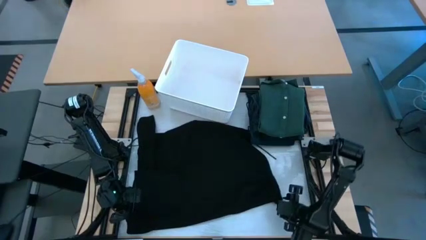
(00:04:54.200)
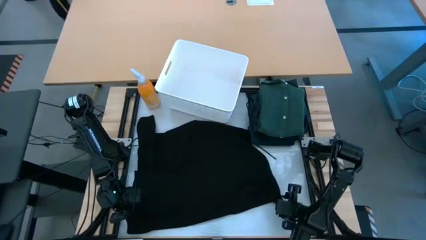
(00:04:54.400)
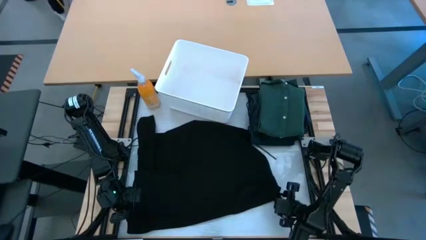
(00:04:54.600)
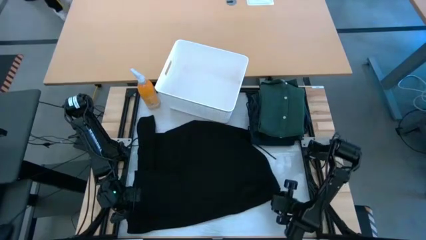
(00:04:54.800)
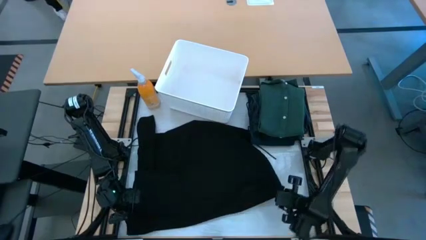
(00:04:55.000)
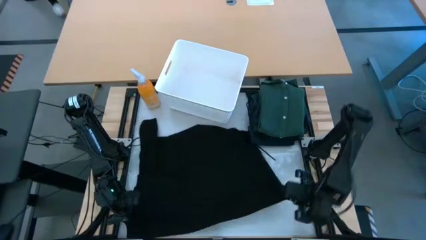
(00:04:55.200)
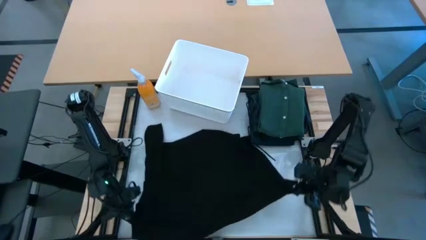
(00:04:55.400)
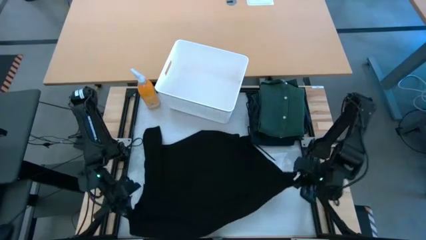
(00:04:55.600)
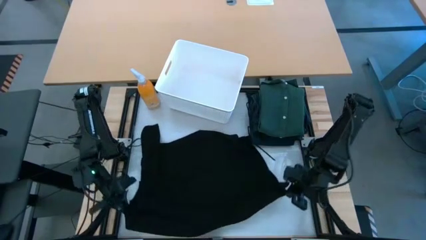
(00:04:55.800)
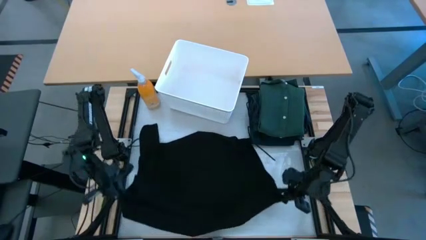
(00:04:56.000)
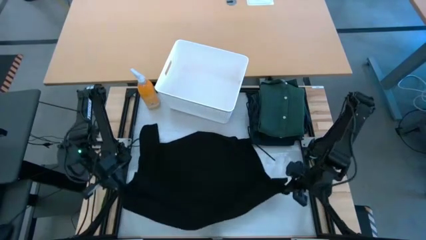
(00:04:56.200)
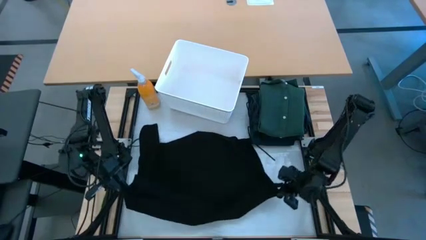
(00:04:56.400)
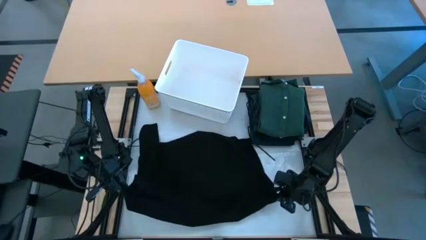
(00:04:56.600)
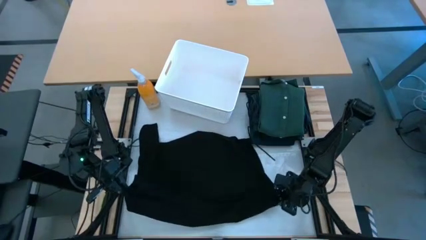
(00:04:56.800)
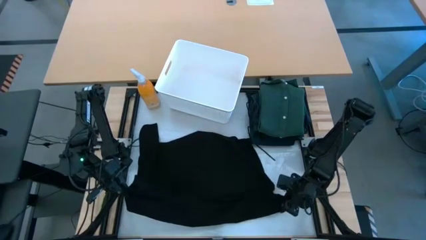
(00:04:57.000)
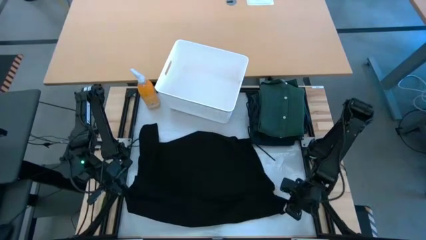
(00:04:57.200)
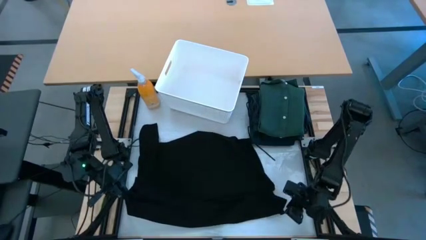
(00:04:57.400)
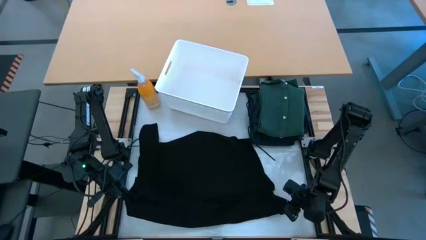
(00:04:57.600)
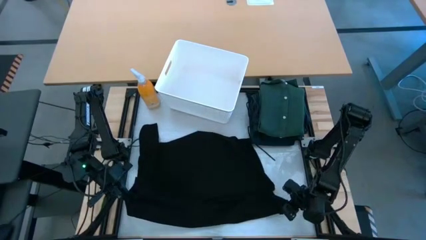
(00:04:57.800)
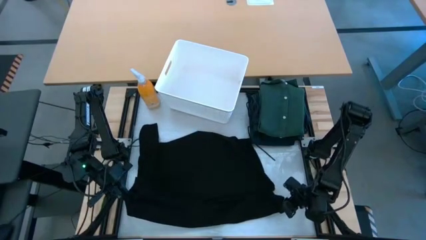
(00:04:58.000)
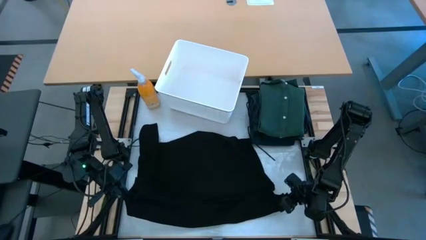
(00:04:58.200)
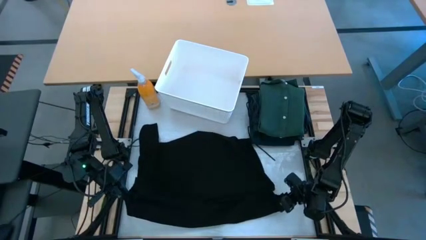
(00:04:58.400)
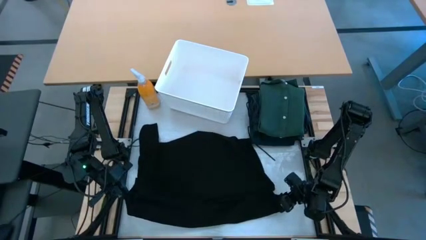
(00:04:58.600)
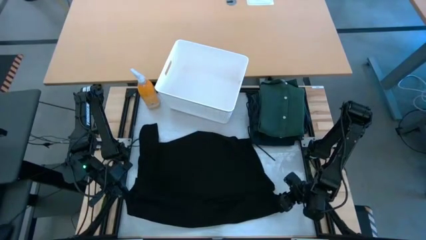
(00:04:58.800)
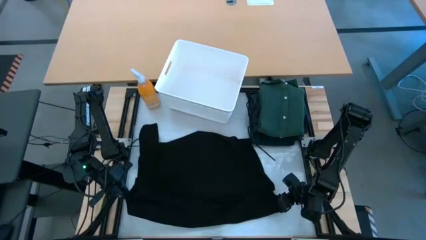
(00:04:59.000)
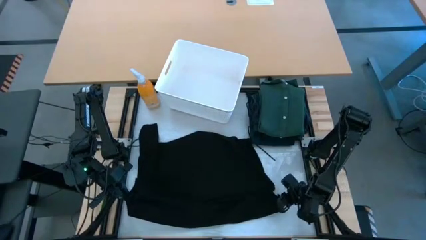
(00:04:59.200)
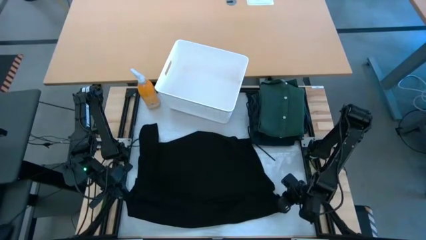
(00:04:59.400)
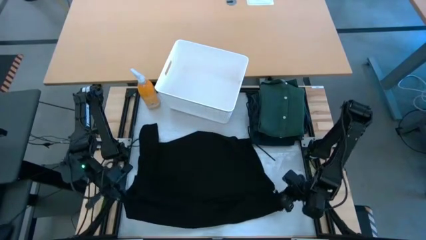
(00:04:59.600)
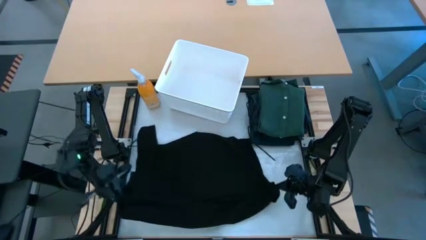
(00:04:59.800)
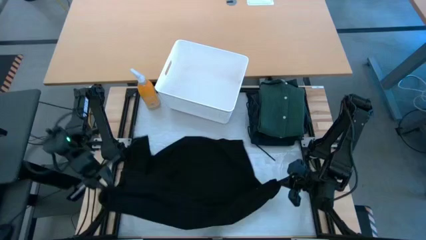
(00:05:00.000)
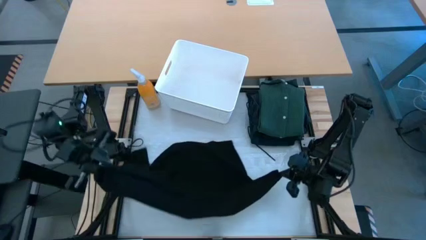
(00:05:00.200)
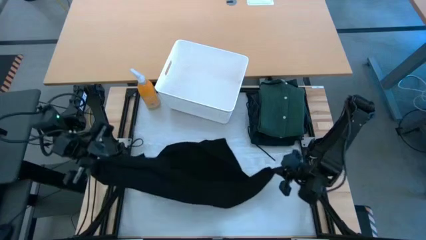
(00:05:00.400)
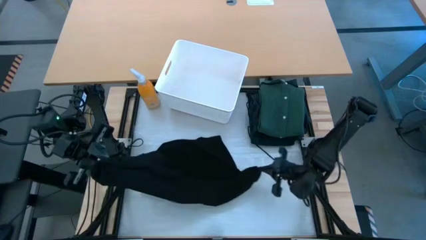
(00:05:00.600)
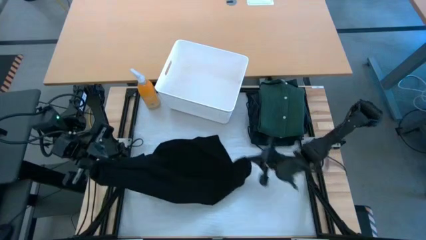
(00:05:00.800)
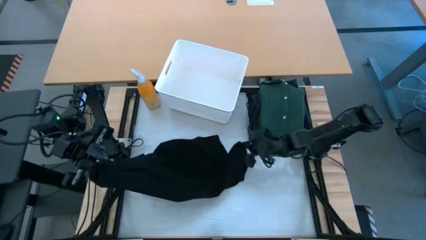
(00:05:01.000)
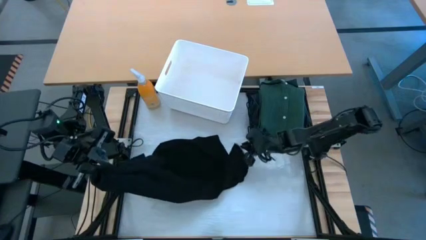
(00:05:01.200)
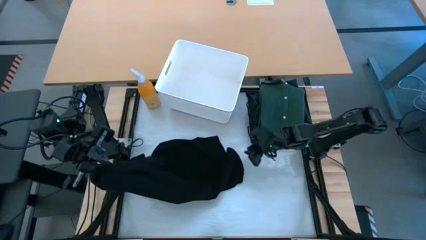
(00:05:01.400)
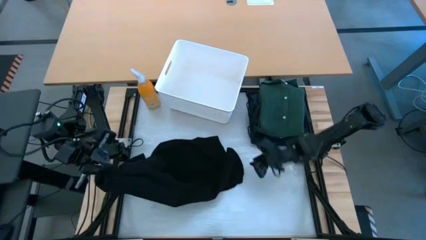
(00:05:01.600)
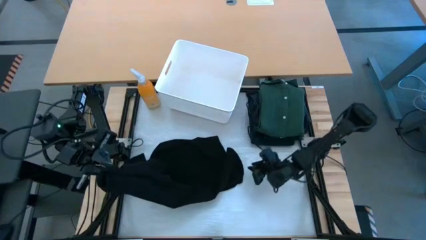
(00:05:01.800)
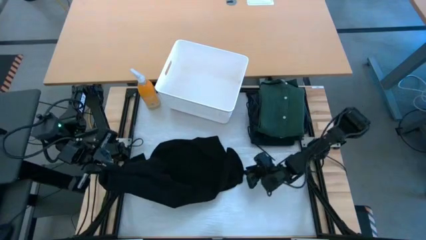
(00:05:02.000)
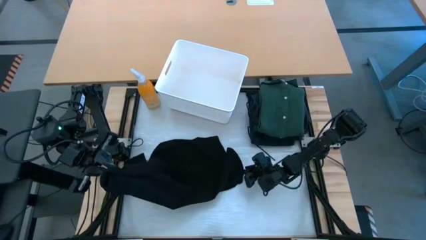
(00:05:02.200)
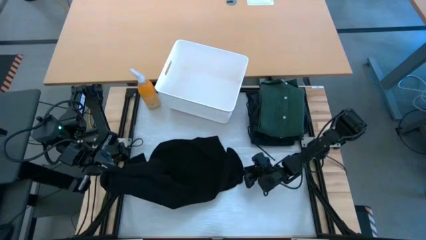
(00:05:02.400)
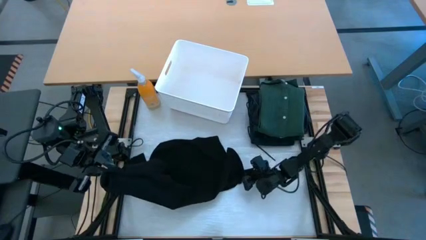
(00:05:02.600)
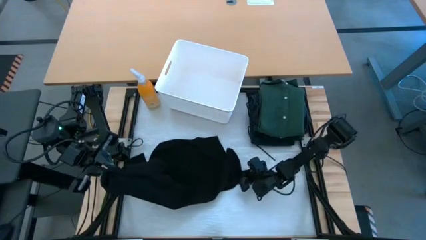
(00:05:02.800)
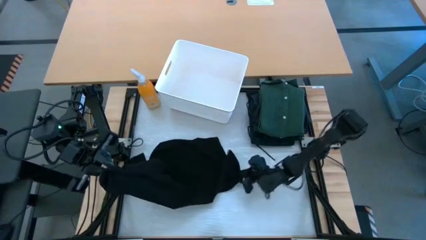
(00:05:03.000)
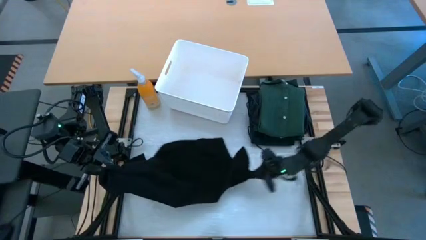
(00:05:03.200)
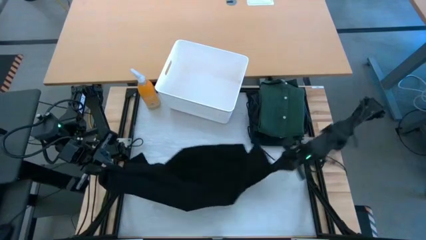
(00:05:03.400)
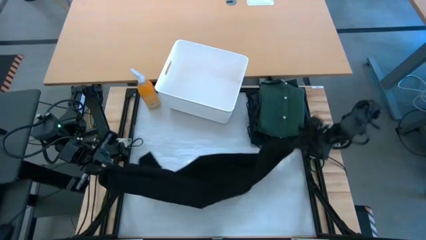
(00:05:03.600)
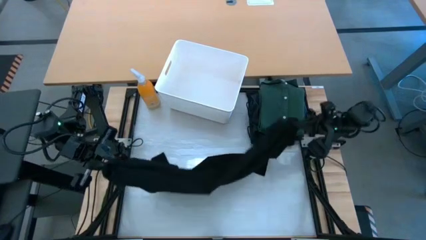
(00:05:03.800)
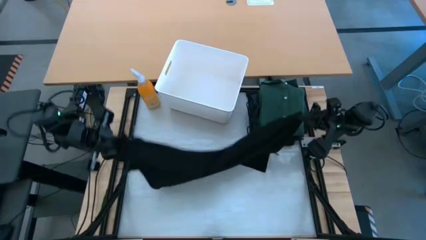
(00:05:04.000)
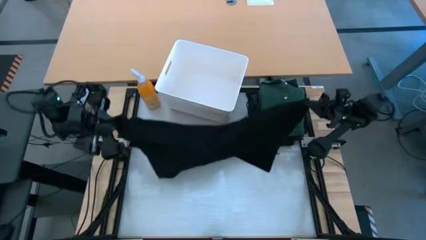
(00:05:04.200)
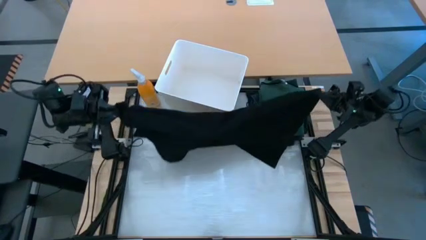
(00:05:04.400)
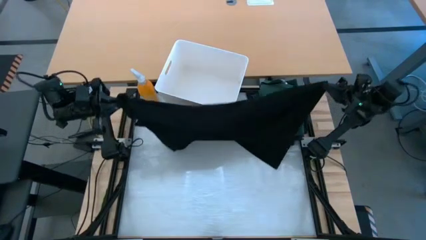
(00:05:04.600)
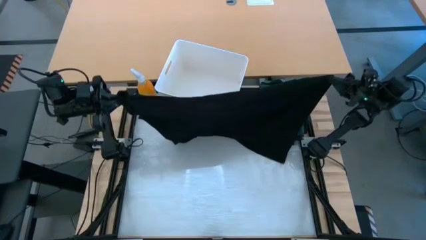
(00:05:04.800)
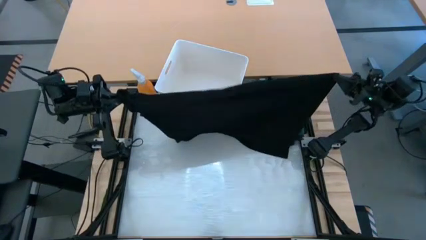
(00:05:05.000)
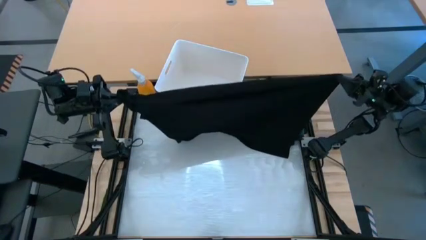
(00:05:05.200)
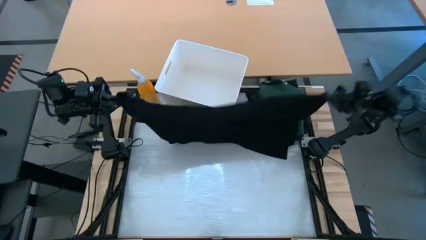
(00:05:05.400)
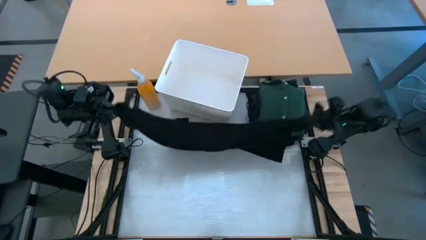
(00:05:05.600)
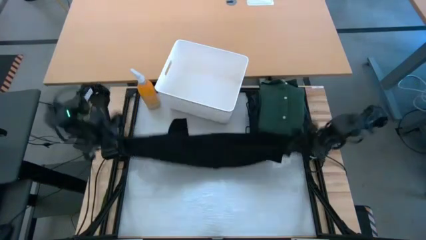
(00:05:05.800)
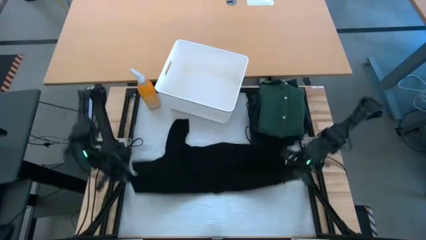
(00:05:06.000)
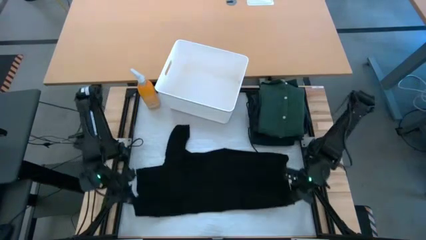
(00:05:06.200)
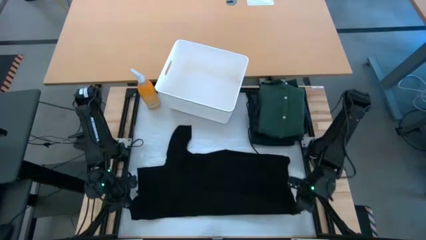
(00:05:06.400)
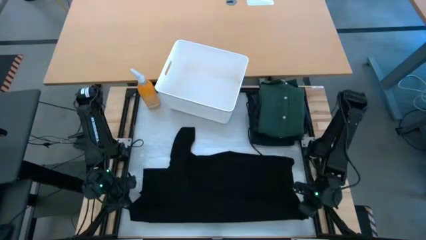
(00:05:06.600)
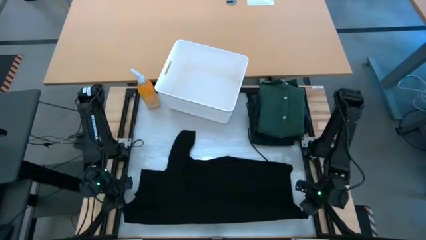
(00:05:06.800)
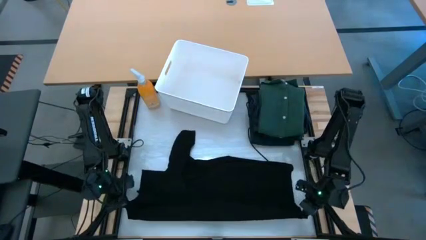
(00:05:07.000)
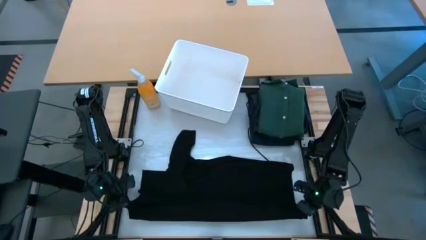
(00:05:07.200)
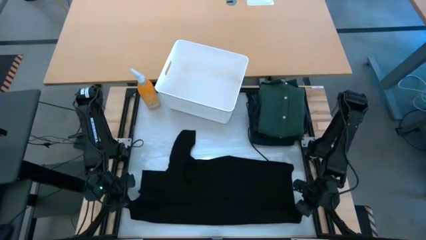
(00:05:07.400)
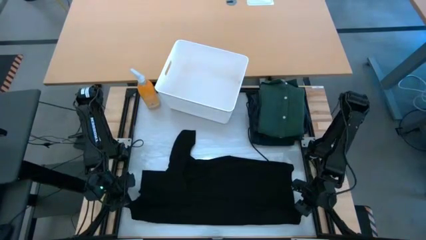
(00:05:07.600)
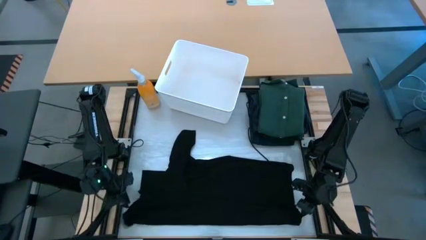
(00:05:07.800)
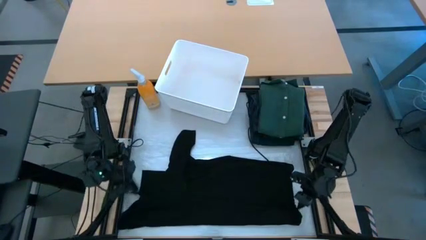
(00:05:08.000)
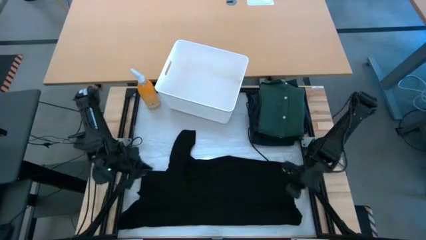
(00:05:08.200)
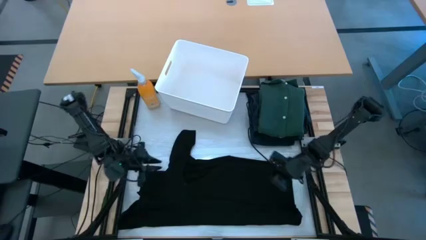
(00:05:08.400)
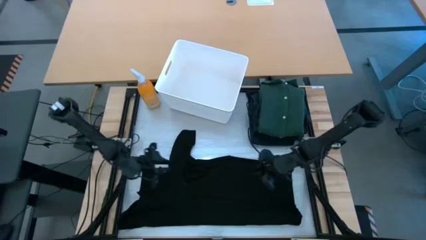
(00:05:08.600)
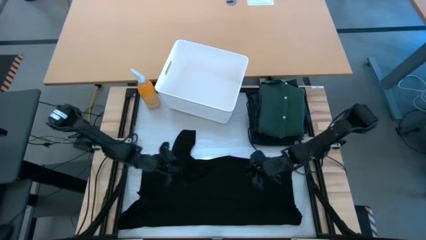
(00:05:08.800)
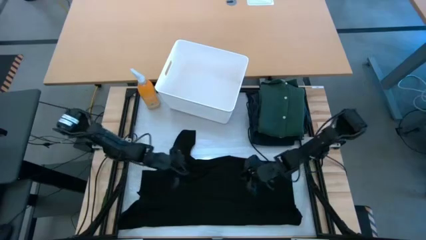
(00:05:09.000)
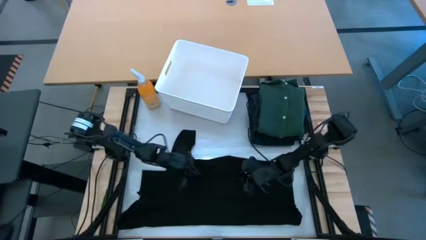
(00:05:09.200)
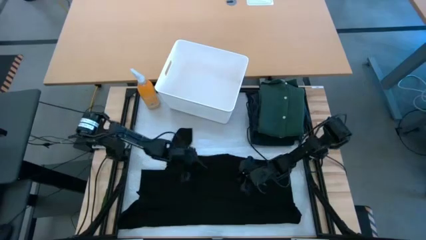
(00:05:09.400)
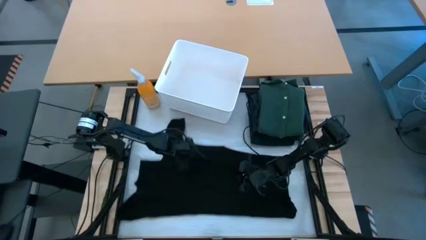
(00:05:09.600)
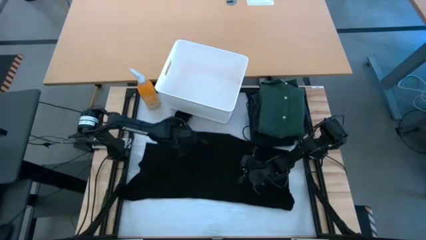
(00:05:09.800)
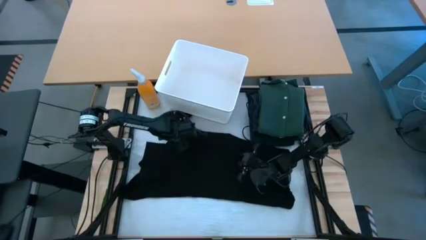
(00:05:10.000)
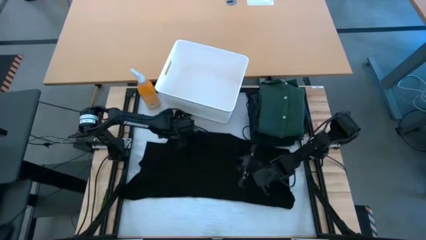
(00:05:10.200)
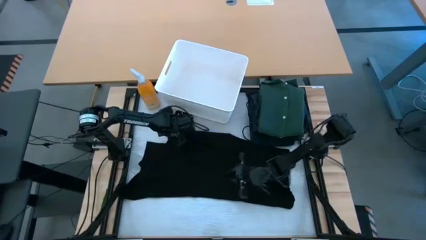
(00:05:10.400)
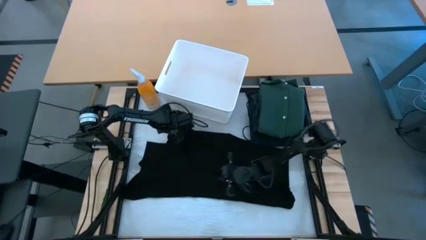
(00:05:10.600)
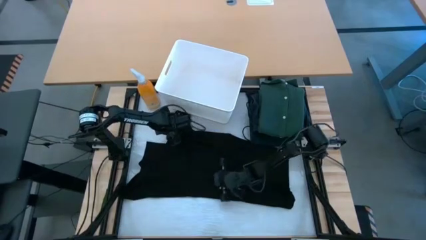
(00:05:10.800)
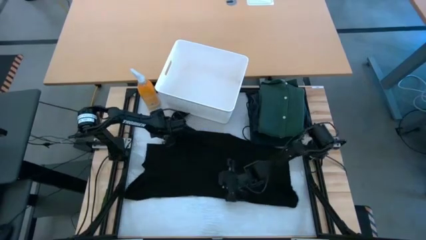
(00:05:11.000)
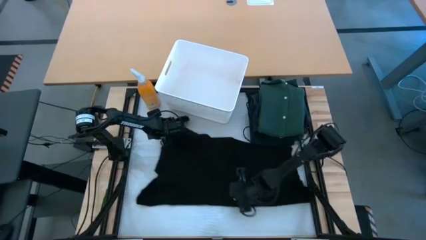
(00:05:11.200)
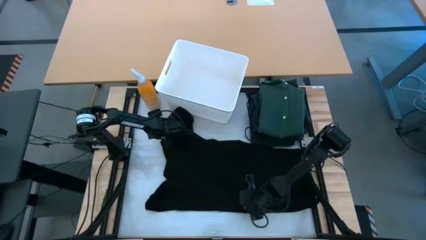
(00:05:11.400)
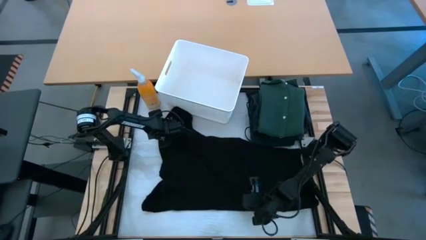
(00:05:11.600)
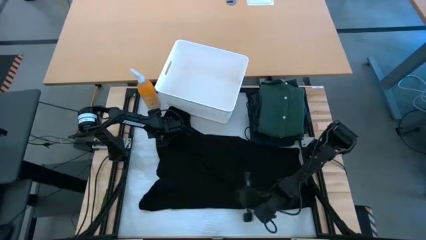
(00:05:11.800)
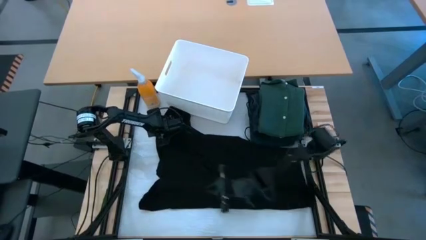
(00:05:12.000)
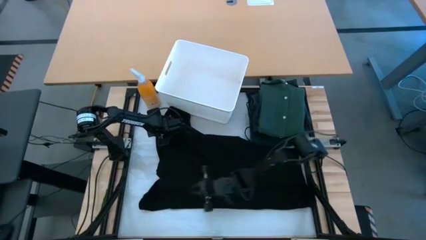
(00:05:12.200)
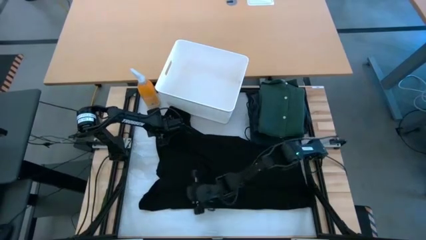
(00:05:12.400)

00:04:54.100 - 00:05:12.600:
Task: Fold laundry
Fold the black shirt
